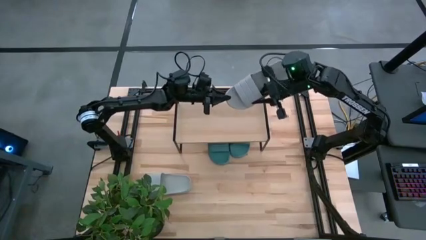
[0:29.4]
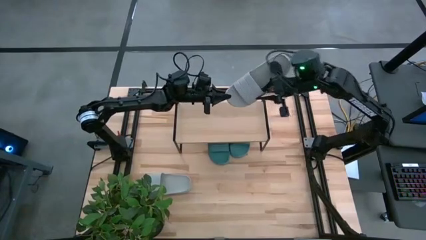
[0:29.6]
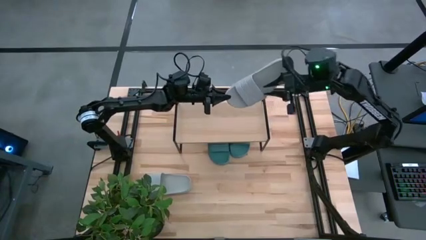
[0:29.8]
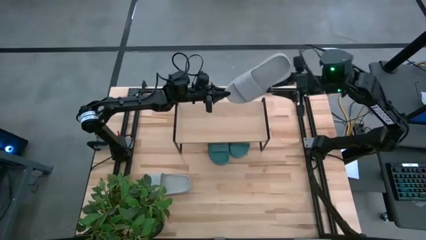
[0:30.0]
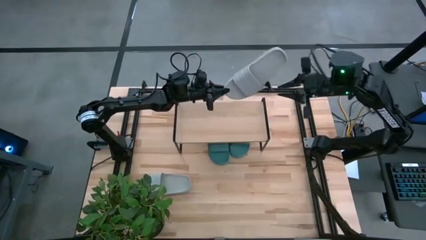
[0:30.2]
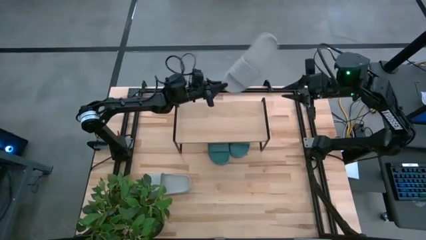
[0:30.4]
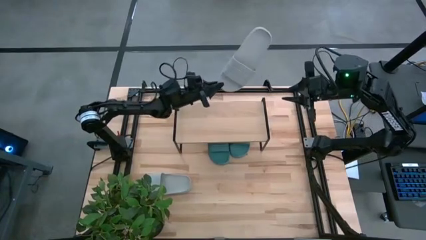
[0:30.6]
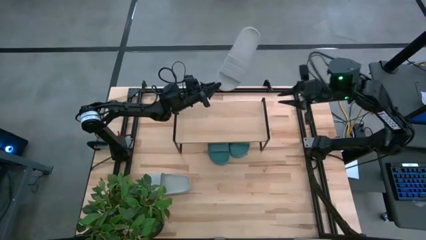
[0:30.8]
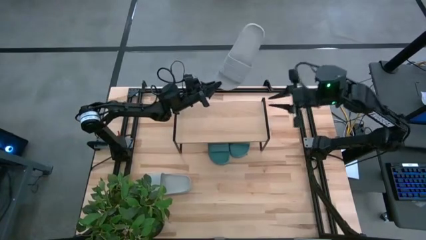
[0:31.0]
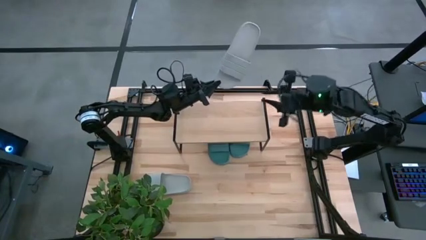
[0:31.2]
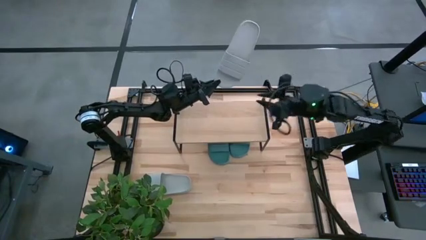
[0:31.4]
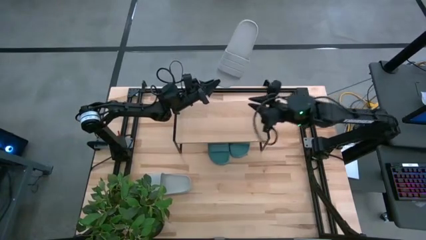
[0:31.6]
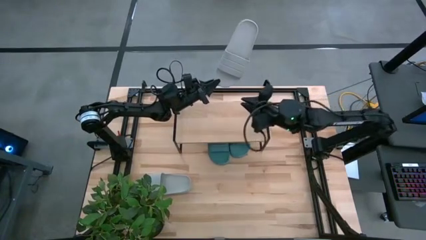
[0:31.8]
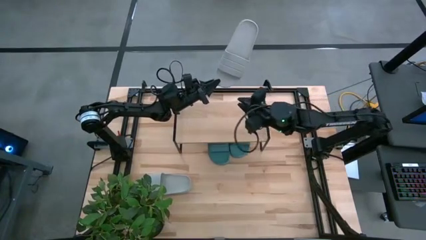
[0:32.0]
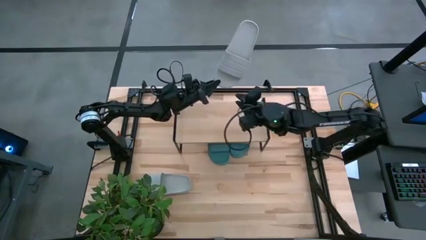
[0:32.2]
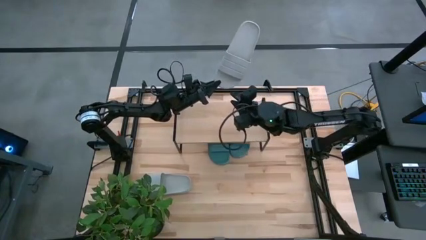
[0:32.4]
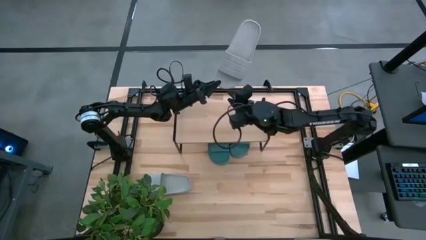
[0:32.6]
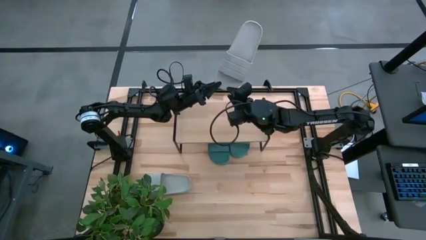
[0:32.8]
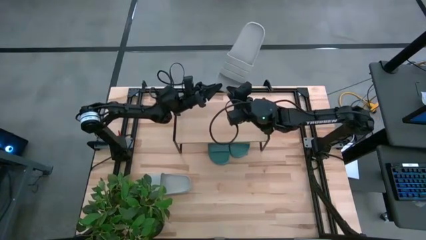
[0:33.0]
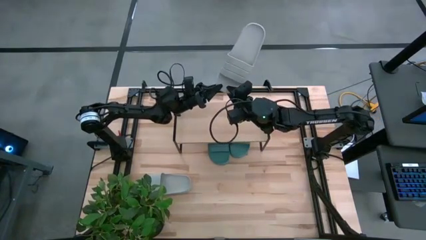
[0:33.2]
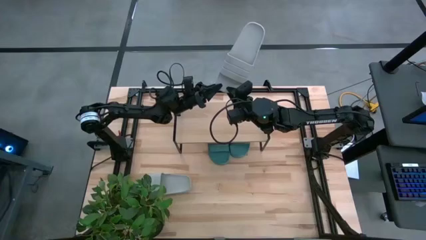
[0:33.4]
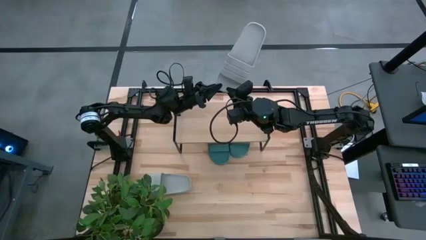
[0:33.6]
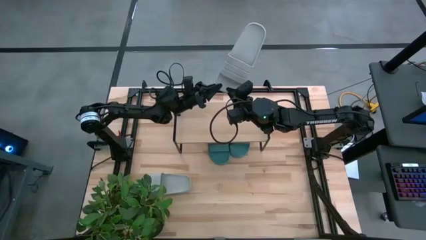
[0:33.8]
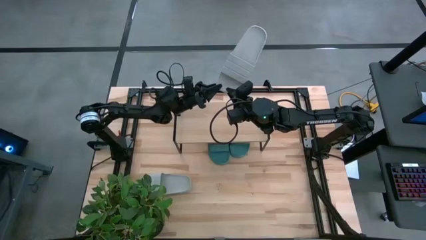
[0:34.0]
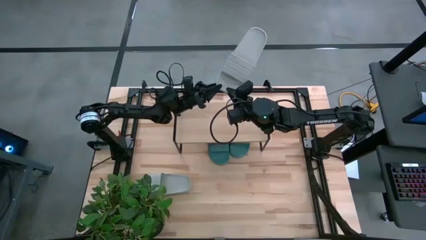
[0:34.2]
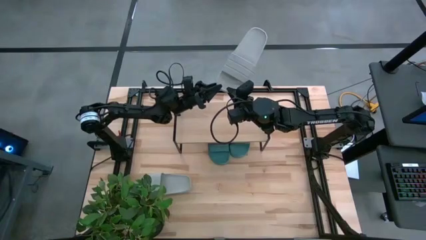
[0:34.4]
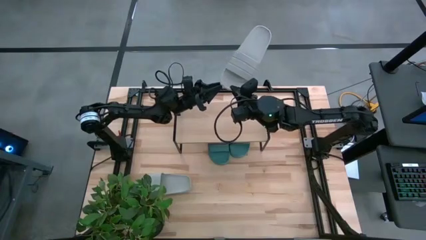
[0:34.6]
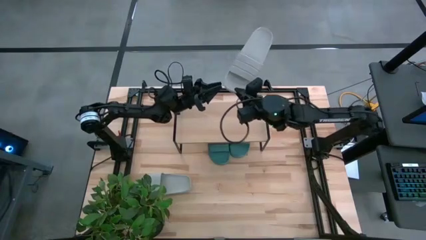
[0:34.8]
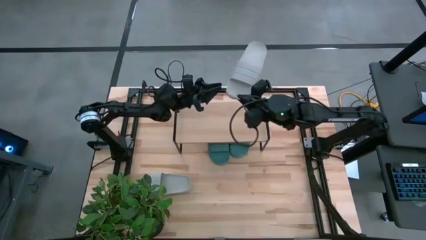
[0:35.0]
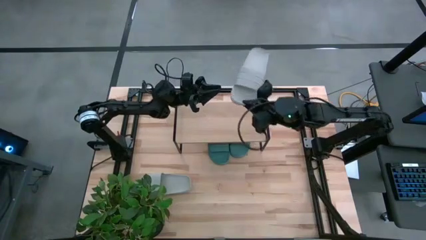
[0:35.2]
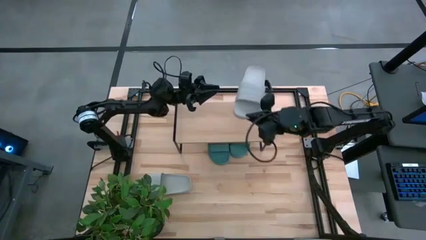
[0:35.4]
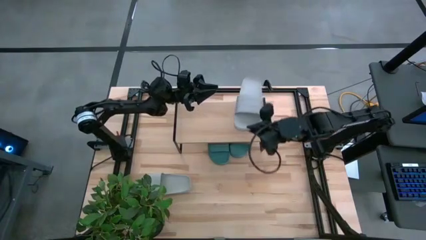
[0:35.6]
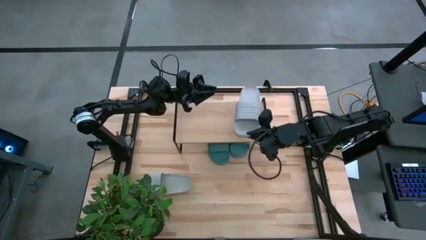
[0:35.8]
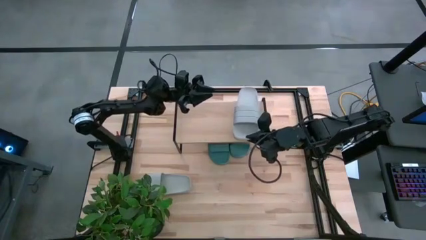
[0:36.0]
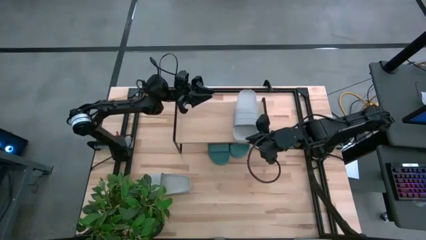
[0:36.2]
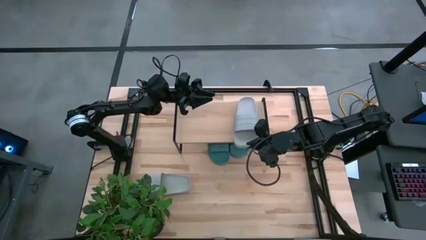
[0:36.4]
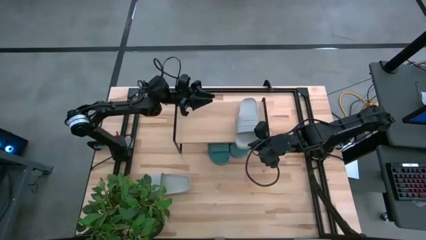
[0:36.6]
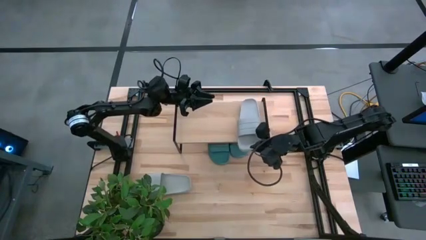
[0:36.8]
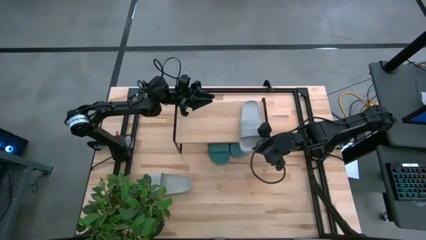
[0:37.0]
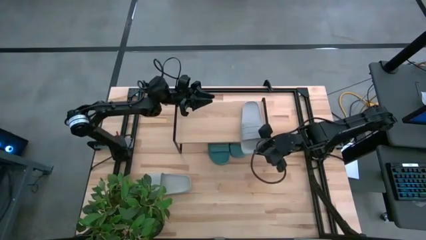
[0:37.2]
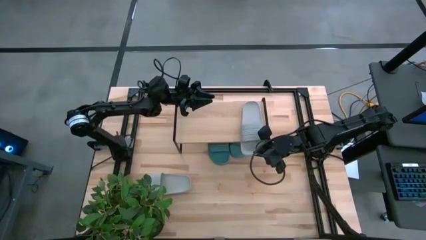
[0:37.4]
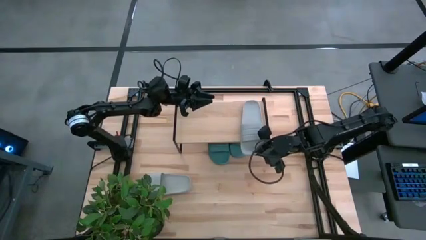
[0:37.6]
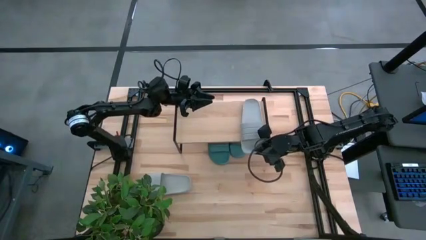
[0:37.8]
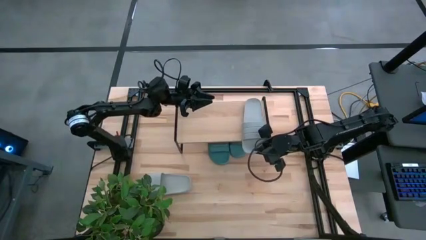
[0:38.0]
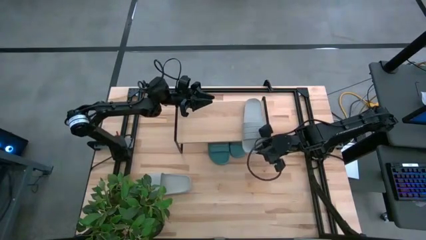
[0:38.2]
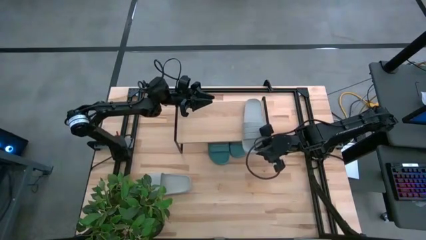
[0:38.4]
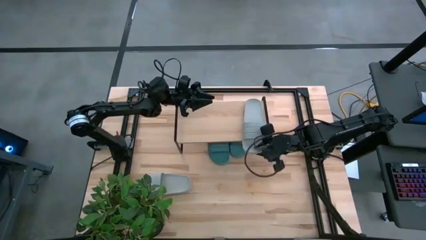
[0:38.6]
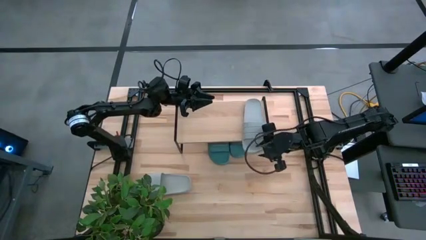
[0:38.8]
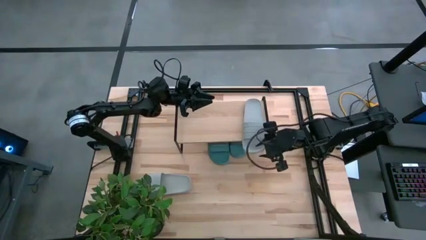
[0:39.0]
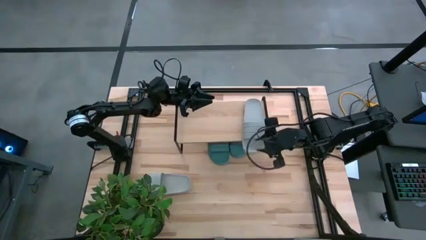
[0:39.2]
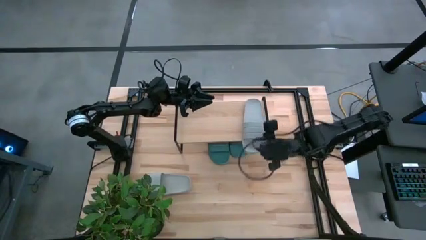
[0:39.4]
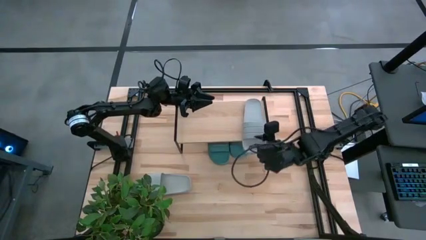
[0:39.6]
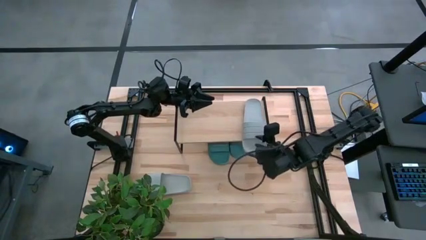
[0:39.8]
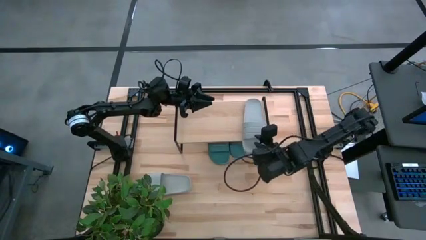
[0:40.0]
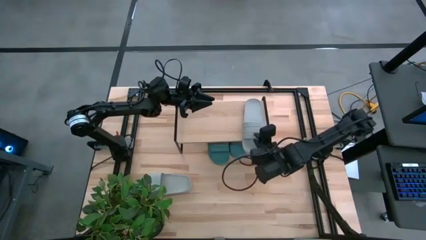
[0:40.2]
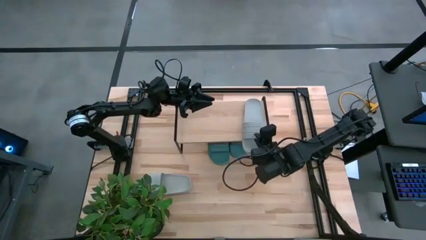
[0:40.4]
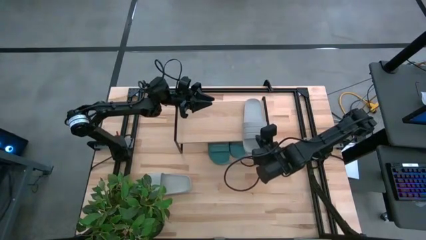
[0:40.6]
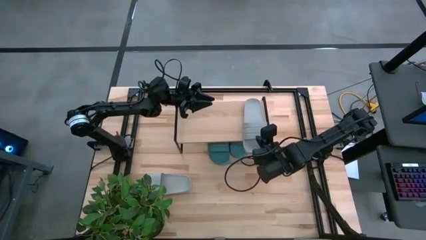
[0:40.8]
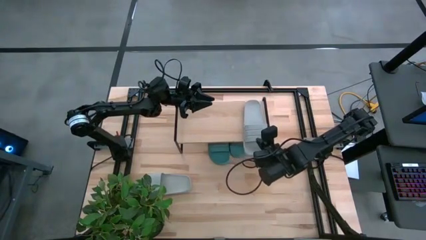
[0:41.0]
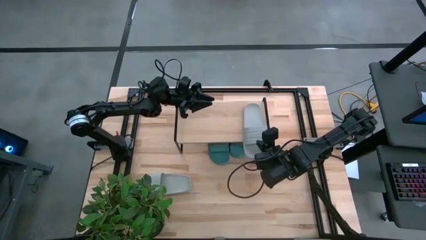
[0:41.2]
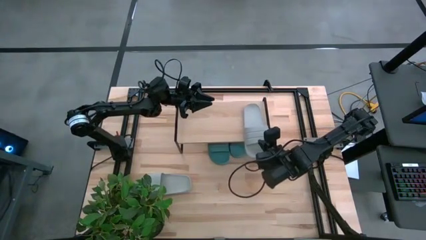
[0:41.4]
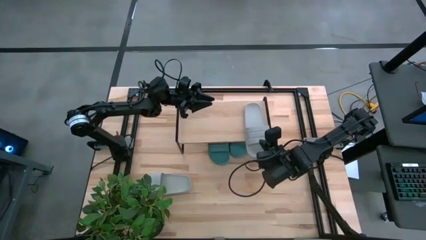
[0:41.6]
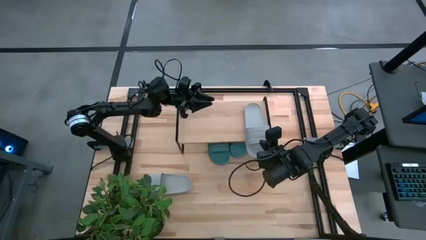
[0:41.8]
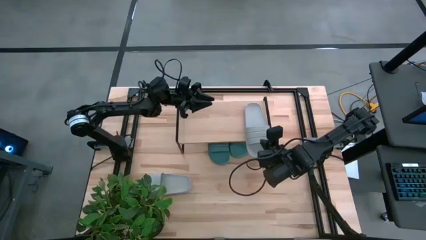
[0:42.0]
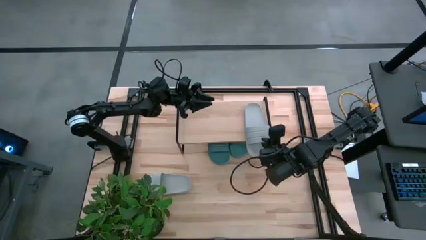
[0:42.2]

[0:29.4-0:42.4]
Task: Pick and place slides into the shelf
Put the right gray slides on the shelf

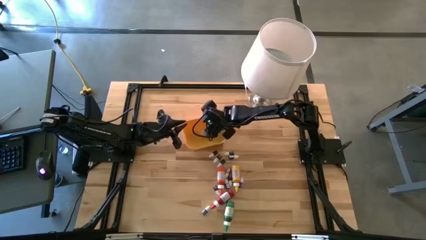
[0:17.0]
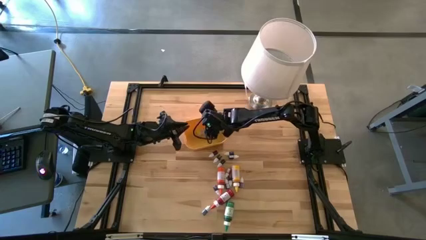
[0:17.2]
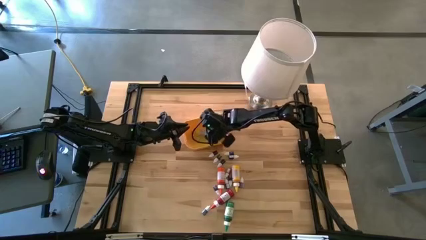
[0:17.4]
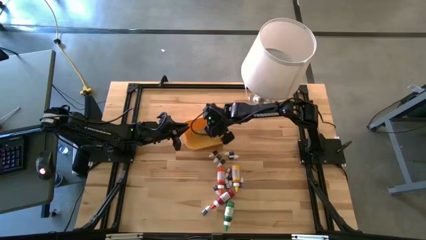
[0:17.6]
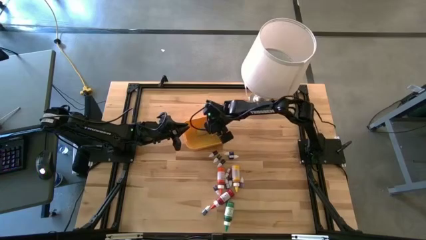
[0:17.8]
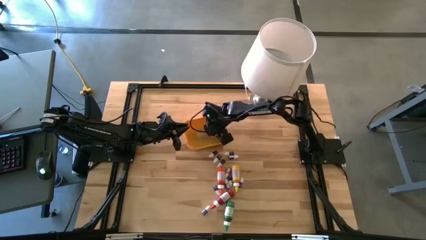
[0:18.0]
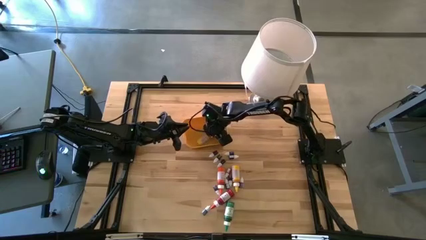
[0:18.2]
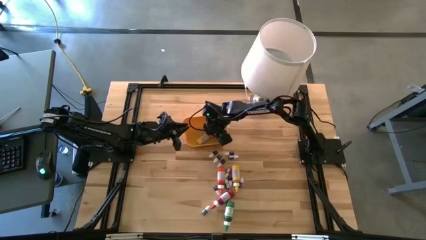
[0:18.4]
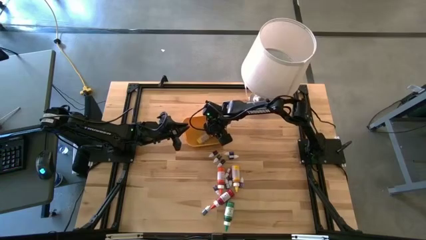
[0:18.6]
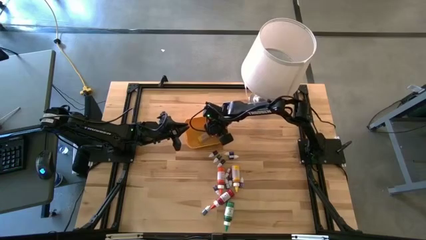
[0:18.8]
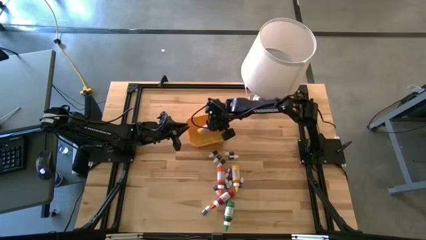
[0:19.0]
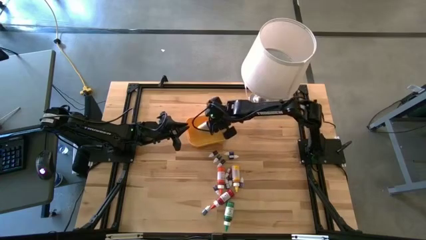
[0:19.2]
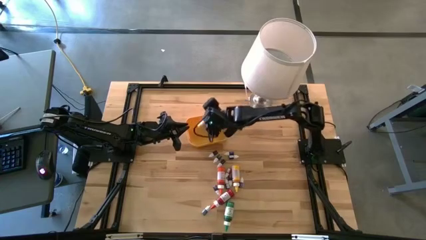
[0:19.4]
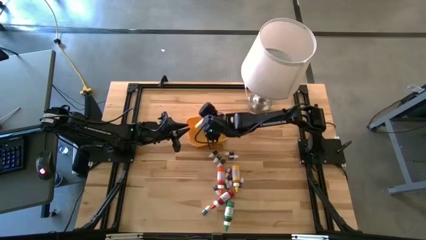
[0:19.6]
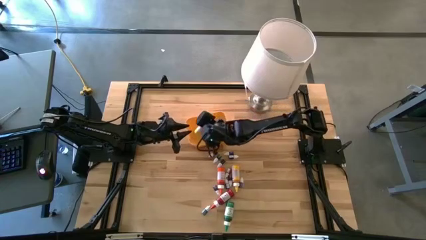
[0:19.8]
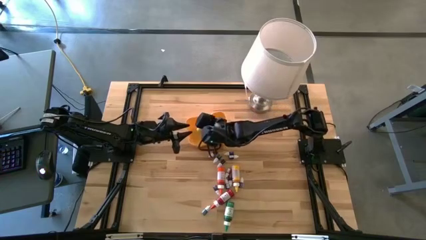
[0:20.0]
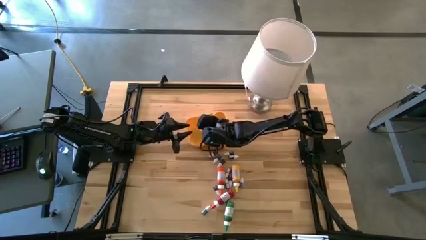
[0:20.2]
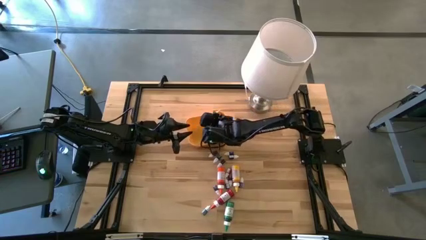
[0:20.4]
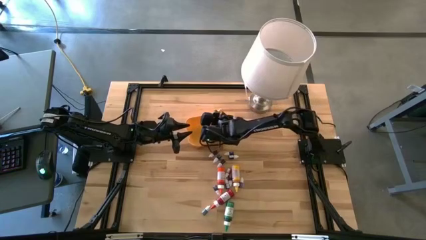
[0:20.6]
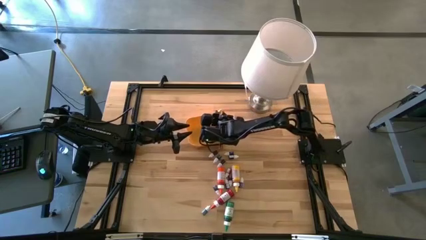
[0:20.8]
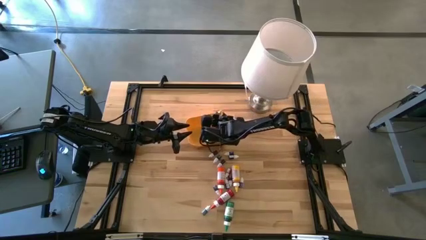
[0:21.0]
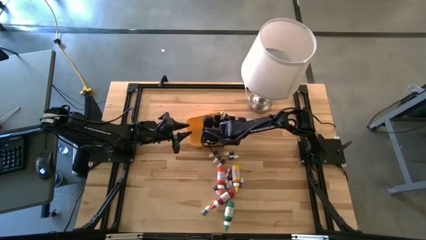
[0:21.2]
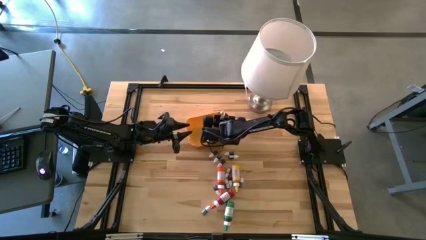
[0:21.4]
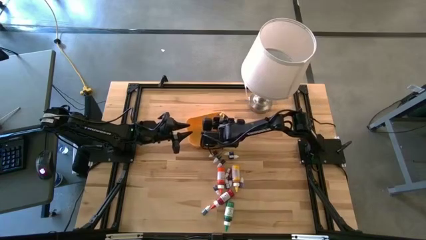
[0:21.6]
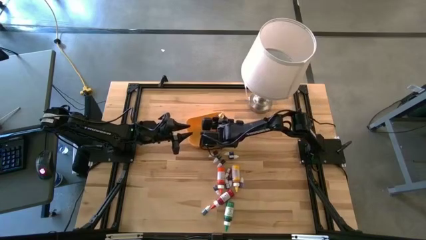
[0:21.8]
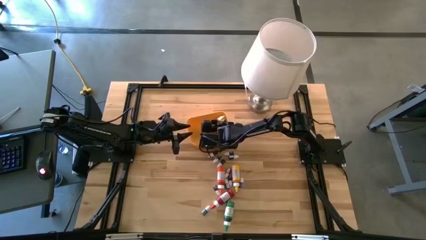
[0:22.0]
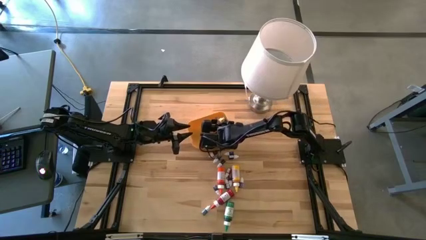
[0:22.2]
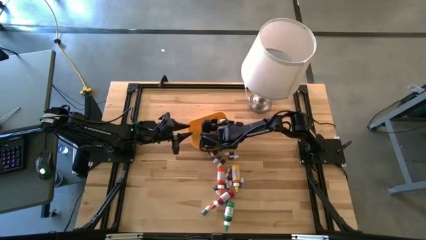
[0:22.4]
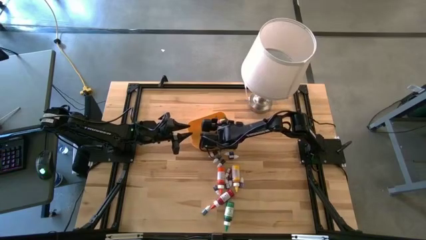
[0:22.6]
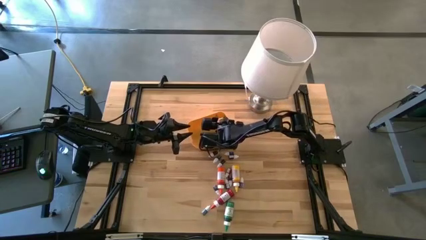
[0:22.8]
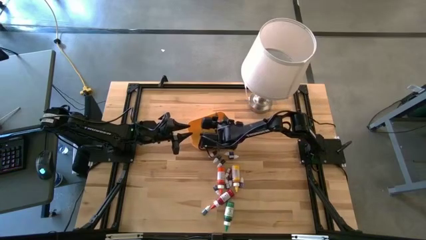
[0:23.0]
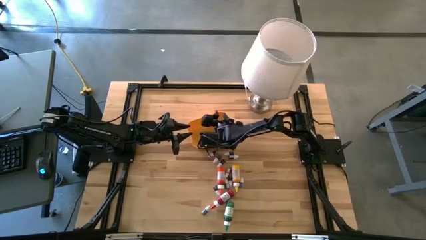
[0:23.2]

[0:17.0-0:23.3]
Task: Pick & Place food coloring
Adjust the large yellow food coloring bottle in the yellow bin
